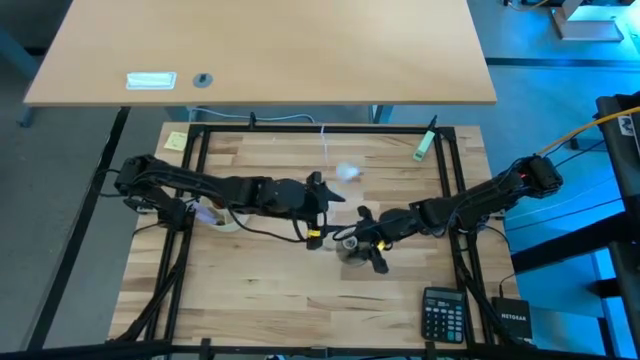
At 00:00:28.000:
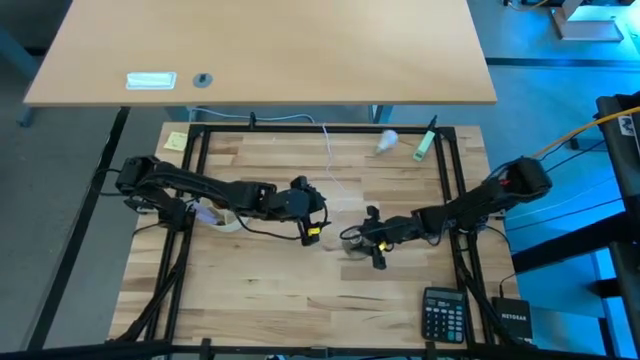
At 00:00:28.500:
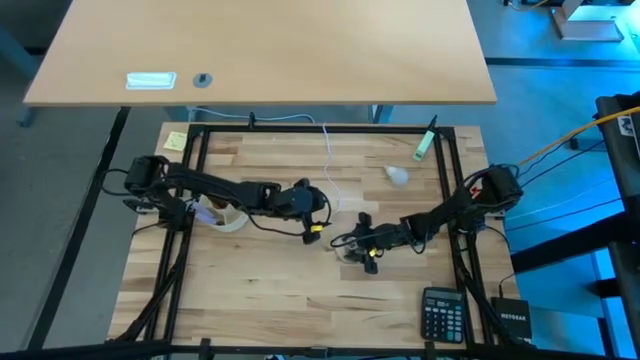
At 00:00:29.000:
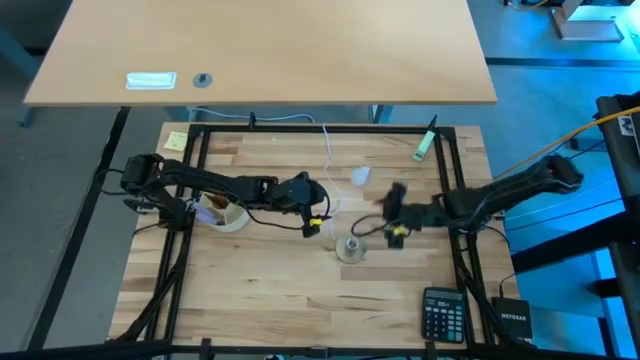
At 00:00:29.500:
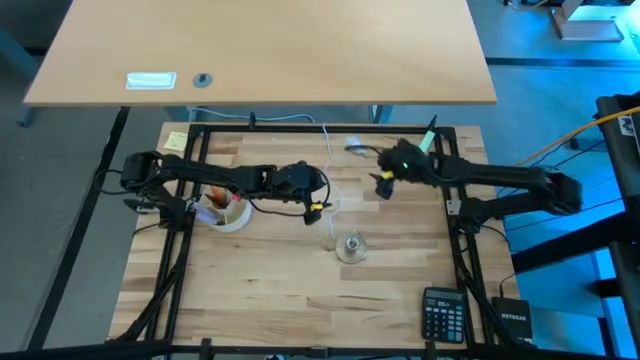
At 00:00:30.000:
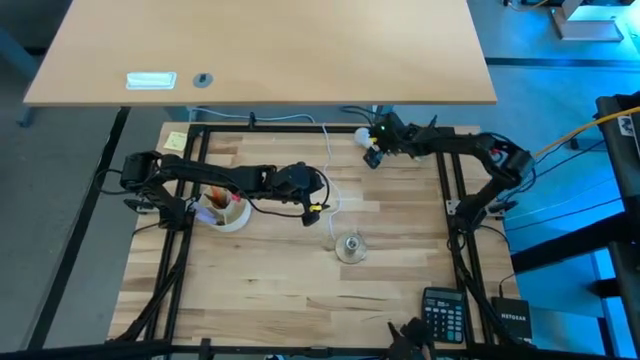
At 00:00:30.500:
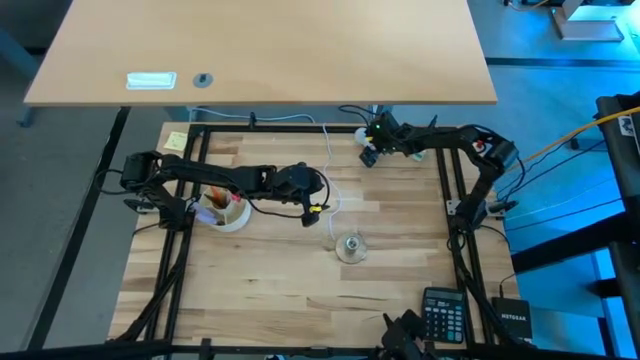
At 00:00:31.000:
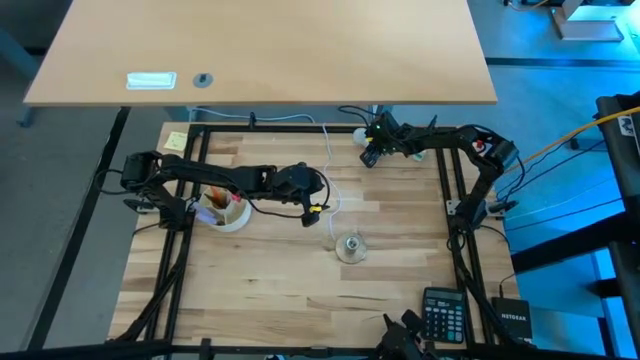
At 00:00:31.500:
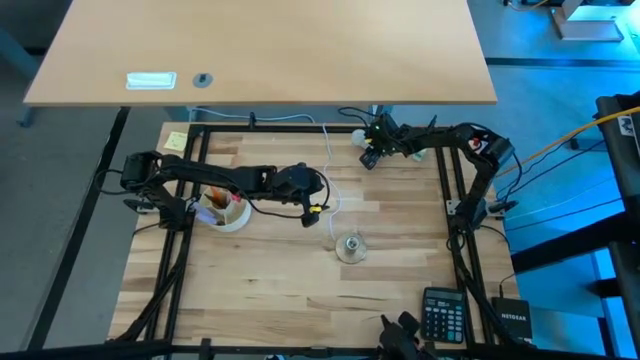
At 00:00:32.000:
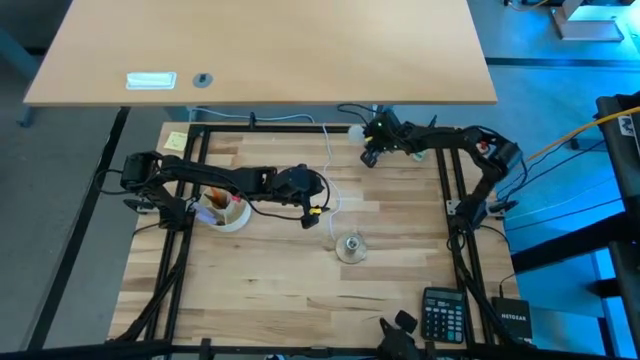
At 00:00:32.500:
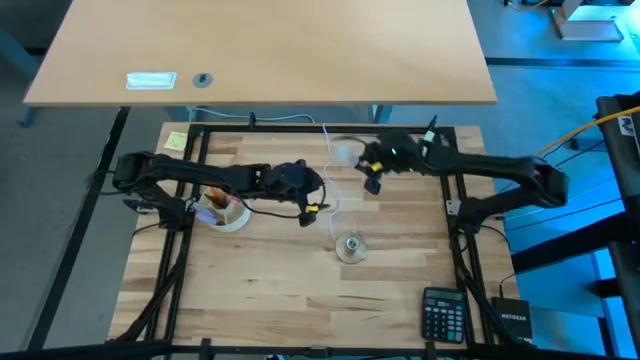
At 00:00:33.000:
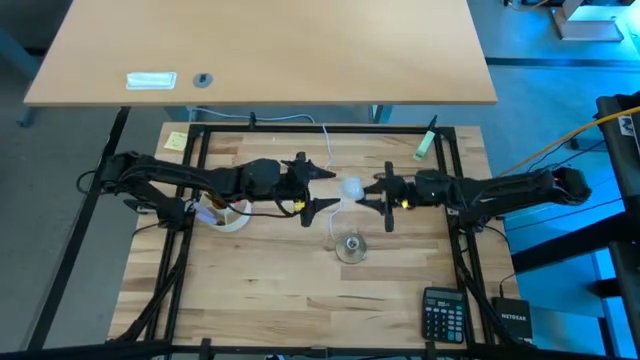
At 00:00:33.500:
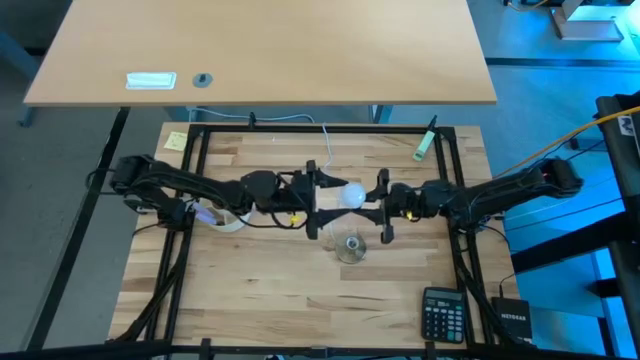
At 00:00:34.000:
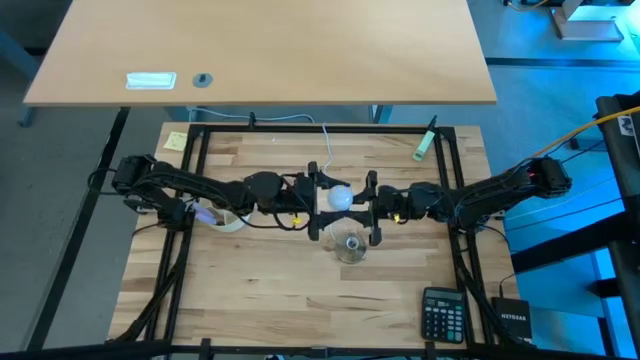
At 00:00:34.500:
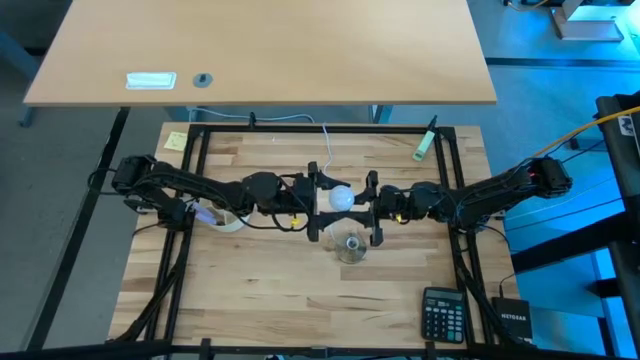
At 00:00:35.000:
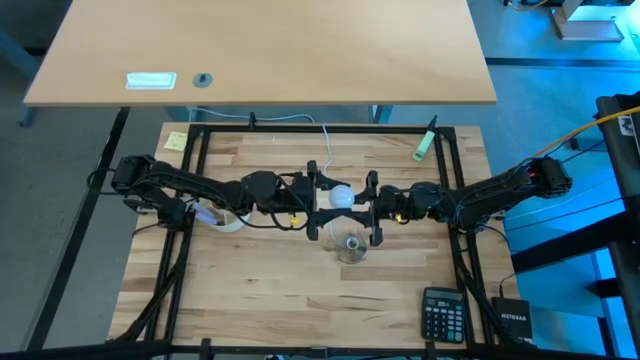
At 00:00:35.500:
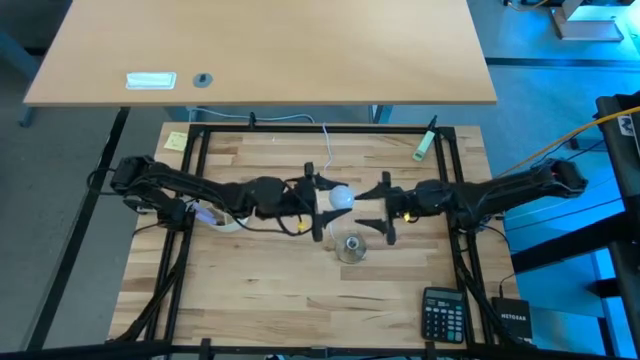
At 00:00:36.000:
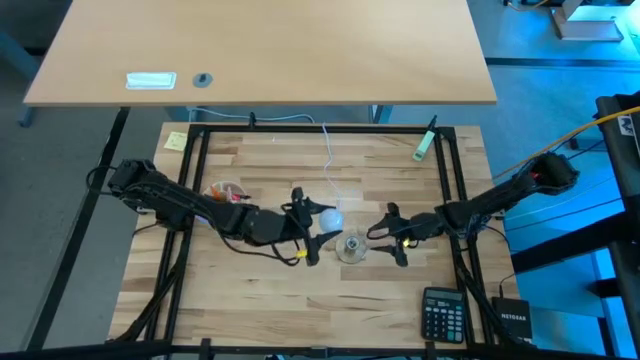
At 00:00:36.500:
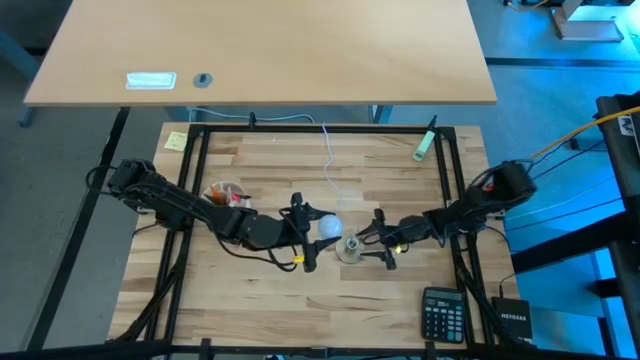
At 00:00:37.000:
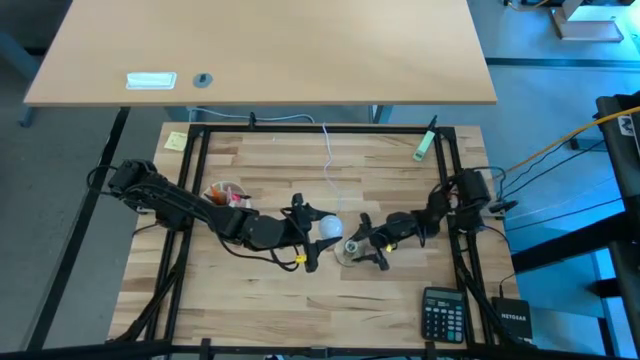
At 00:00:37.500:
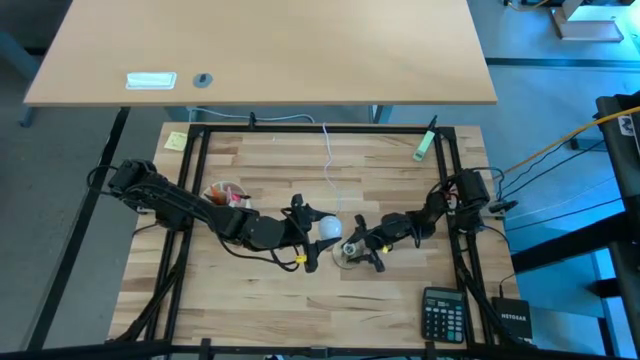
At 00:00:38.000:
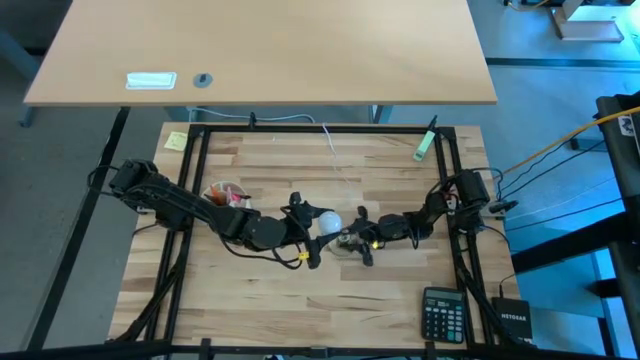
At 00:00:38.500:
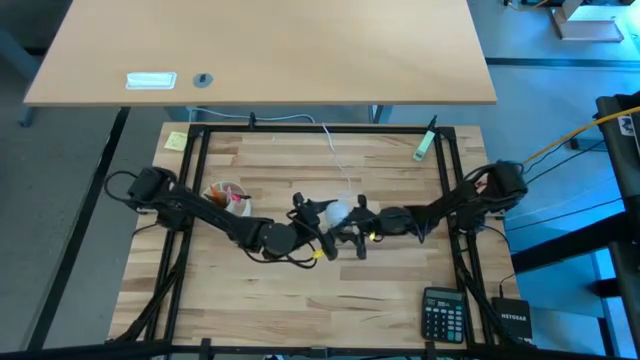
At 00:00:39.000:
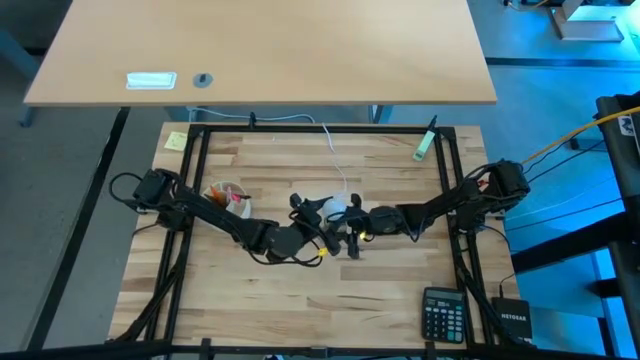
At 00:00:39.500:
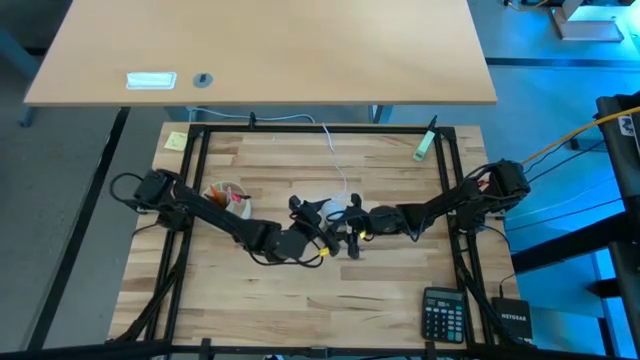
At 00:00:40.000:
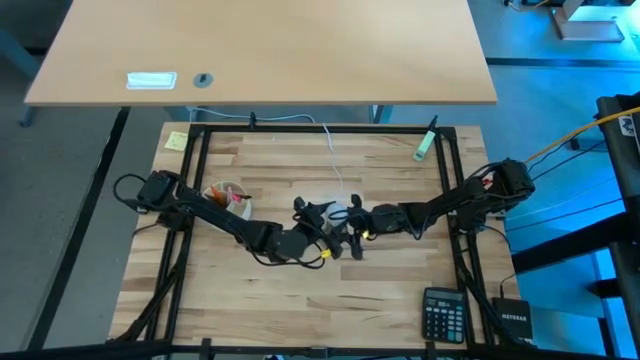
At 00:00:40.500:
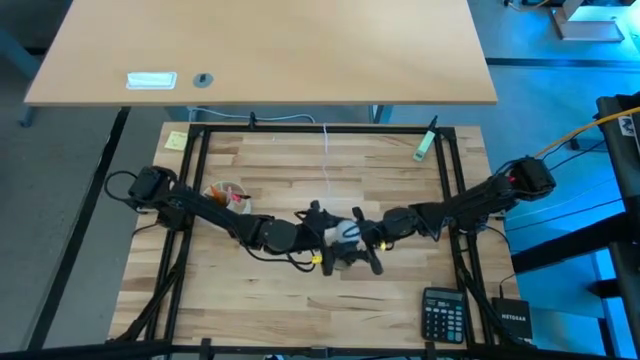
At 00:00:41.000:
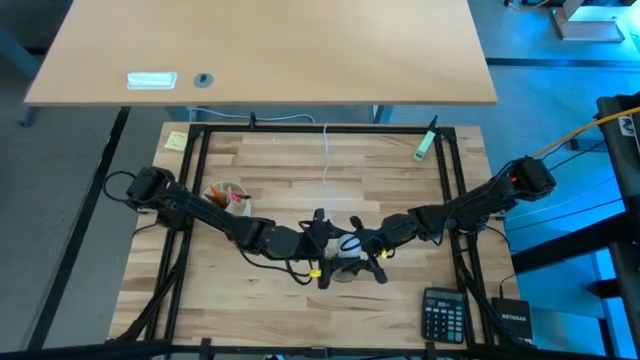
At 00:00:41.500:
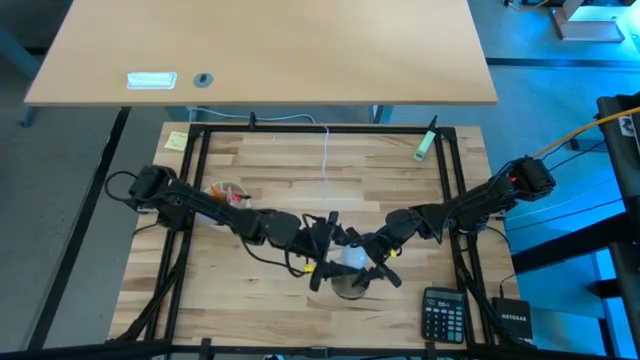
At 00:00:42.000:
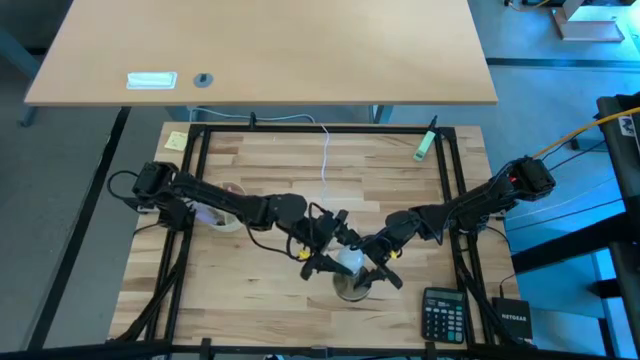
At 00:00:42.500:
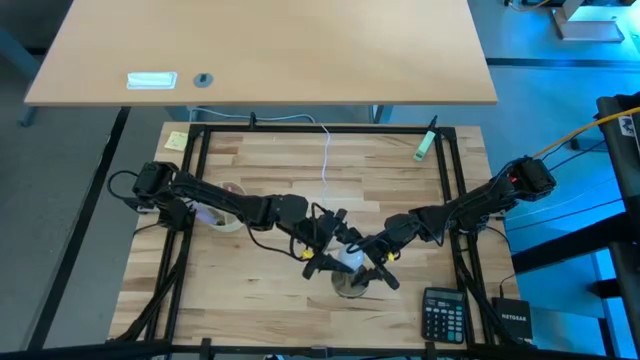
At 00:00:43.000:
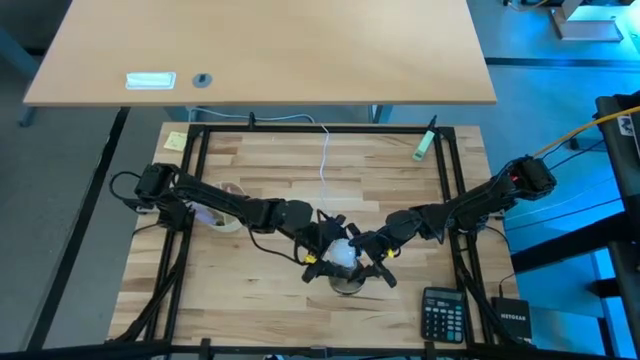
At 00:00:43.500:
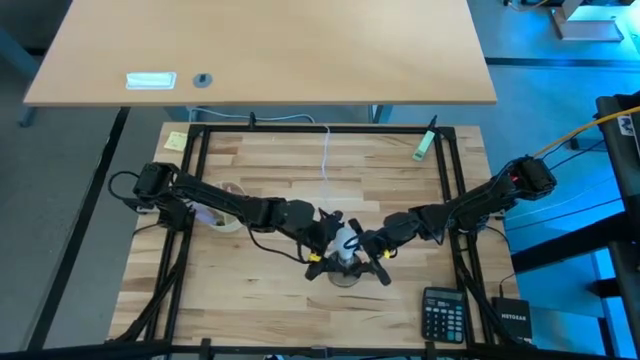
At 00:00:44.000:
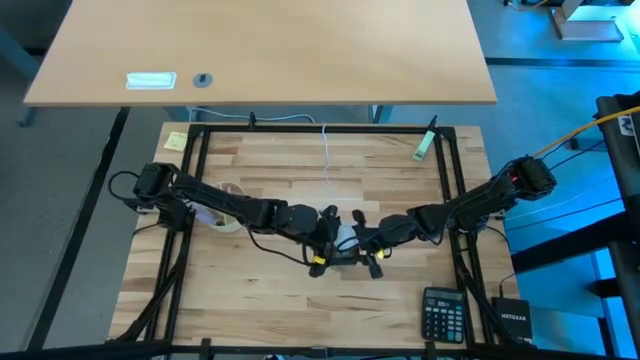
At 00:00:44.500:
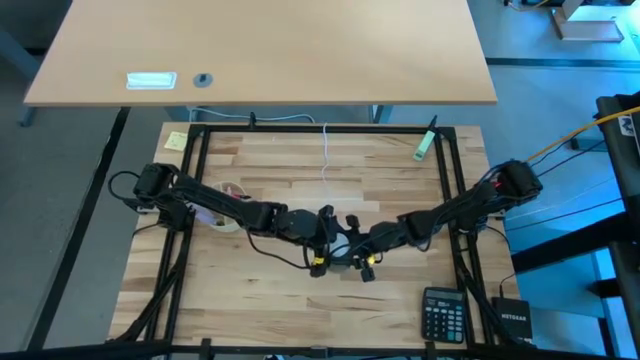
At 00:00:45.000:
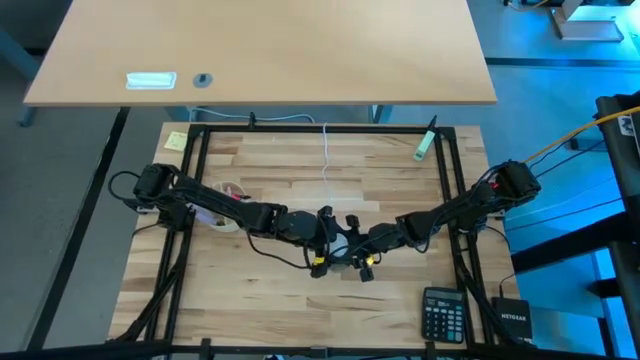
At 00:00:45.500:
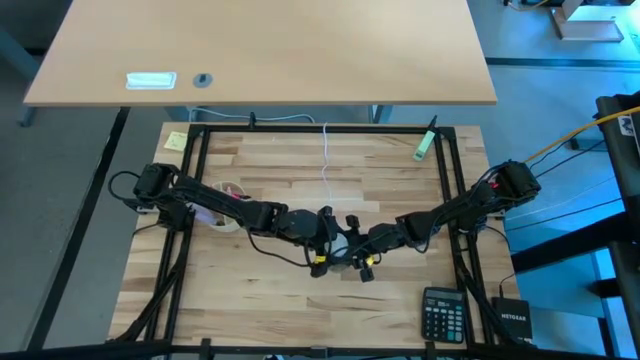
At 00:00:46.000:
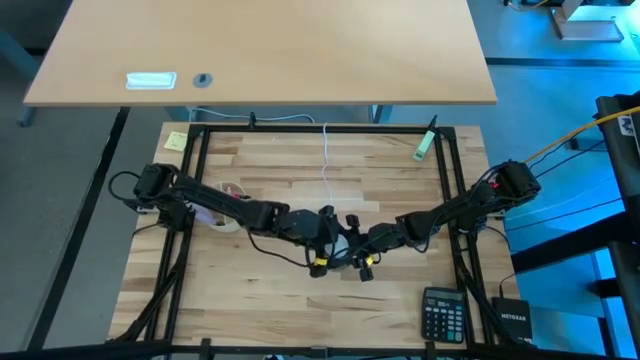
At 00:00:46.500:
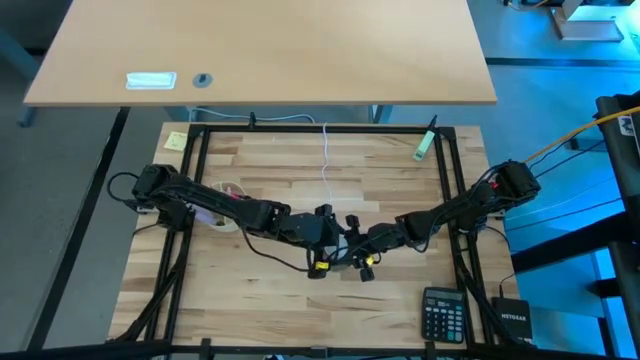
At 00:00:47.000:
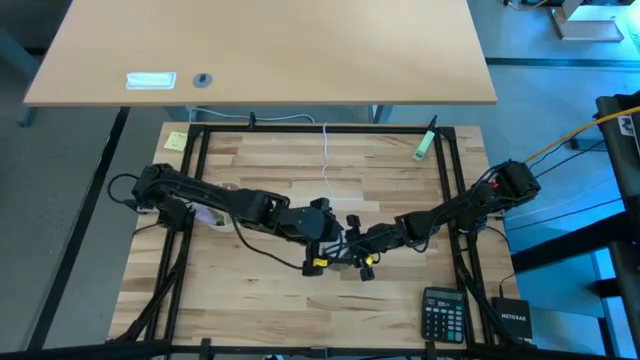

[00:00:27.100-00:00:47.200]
Task: Screw lightbulb
Insert the lightbulb into the lamp
